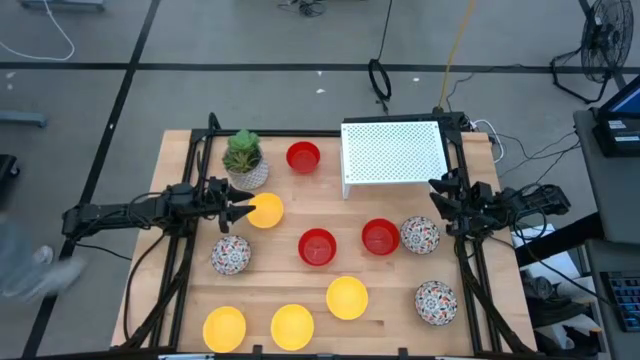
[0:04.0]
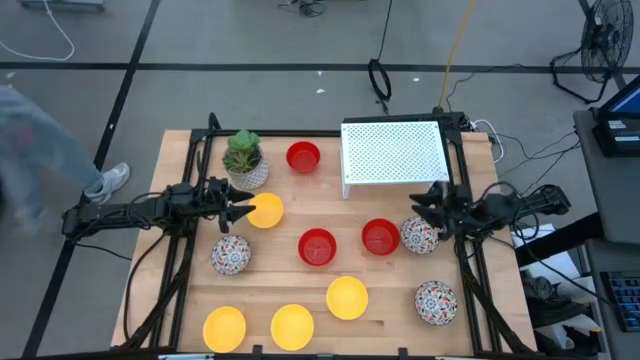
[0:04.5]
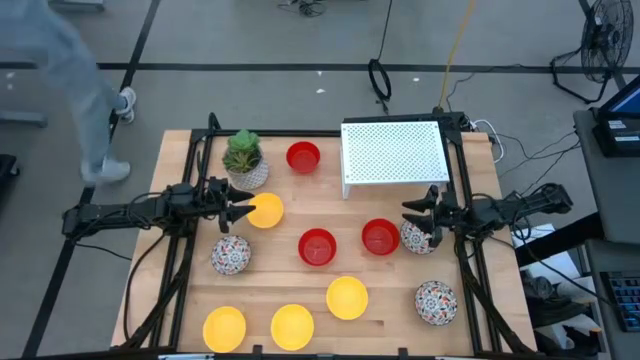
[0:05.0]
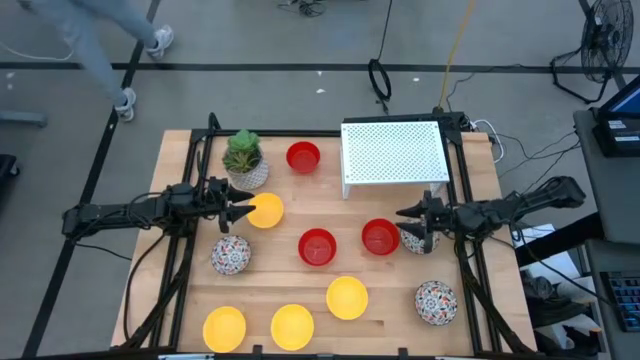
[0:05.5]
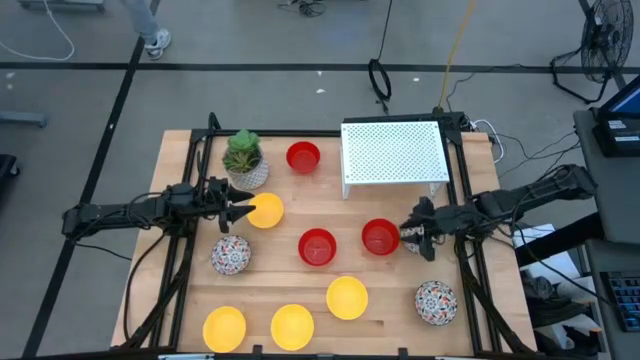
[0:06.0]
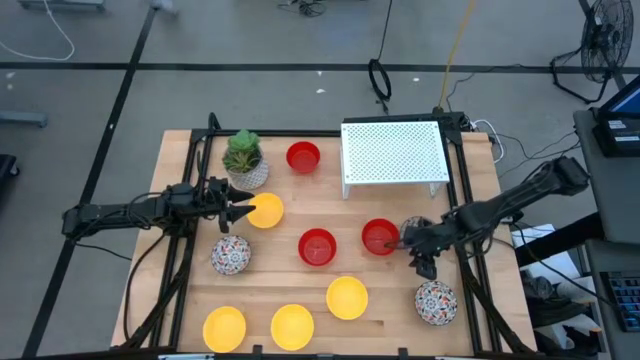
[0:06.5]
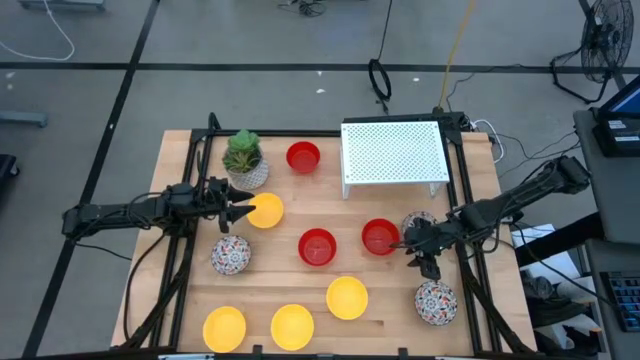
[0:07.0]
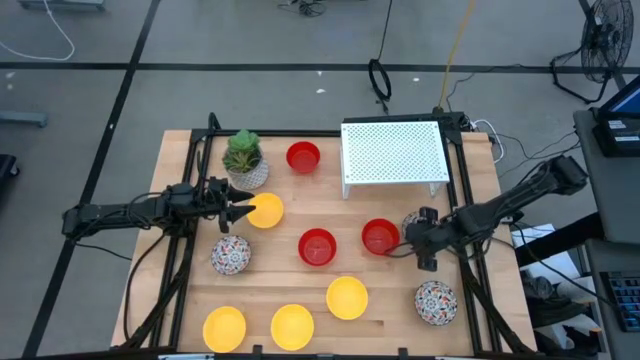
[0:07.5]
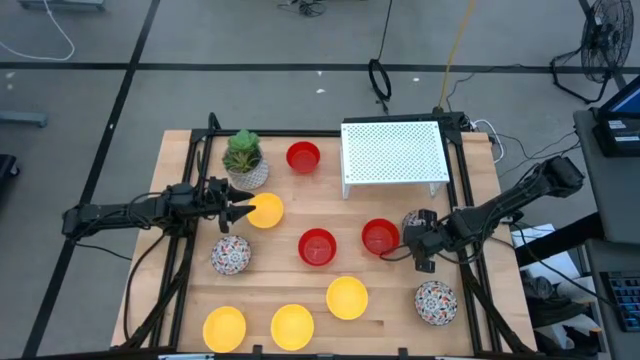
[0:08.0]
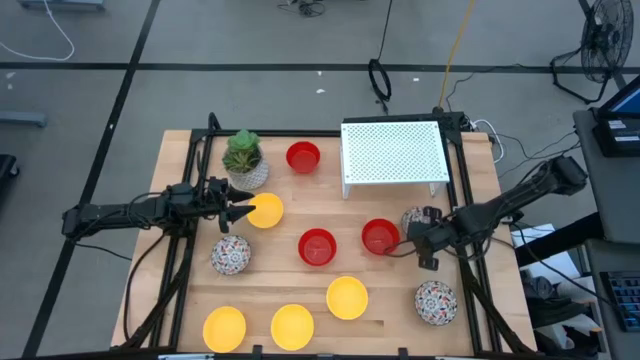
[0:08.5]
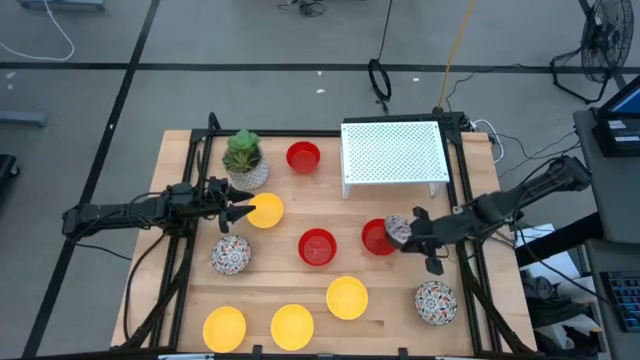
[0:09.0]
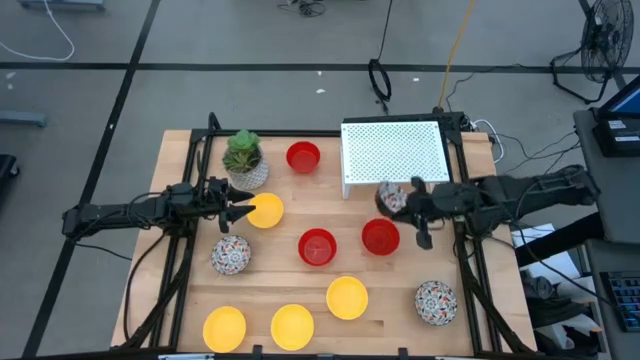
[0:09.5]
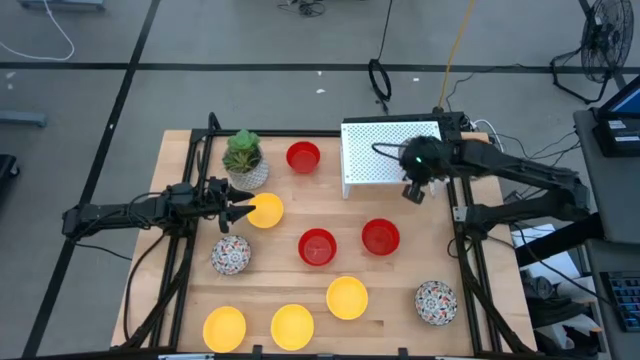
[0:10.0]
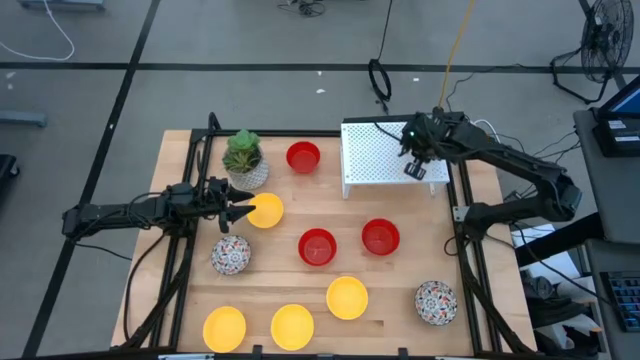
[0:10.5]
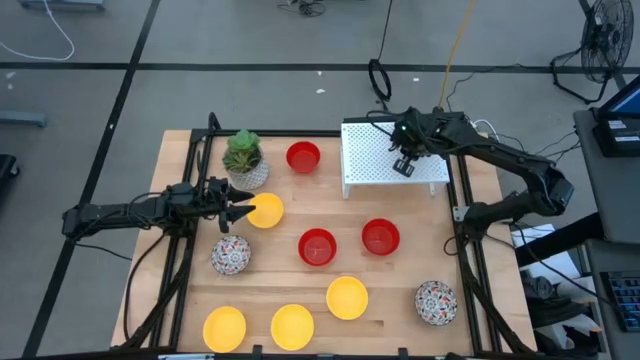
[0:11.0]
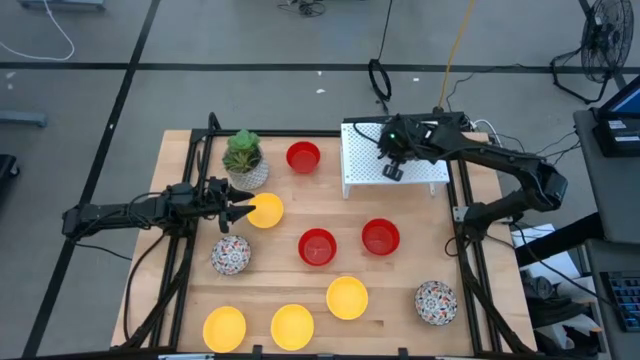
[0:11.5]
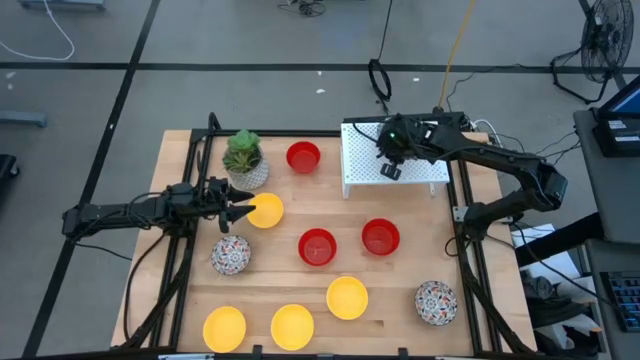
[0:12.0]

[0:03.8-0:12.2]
Task: Pick & Place Mini bowls
Put the black patterned bowl on the shelf

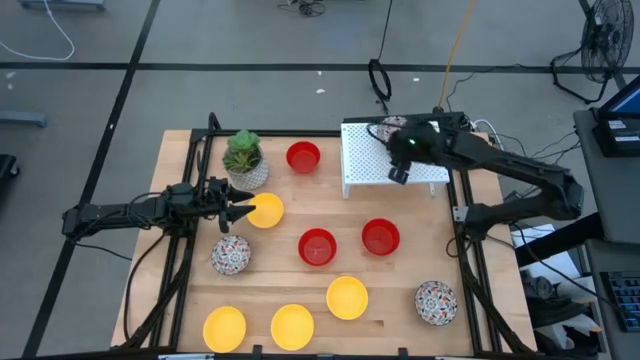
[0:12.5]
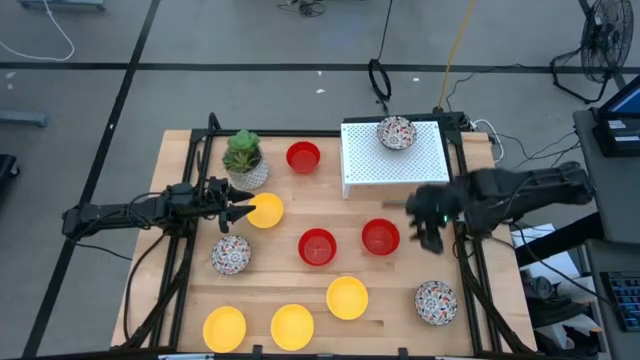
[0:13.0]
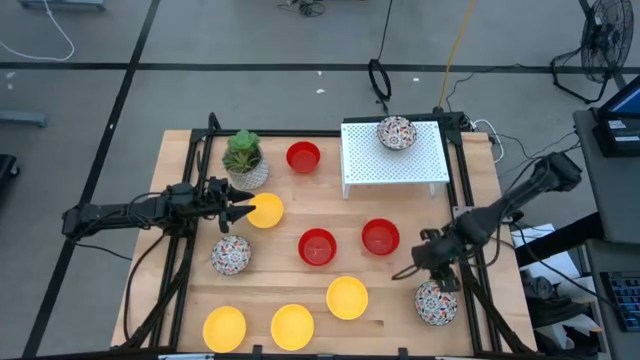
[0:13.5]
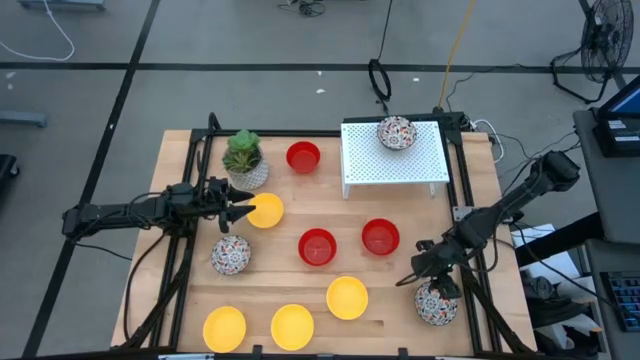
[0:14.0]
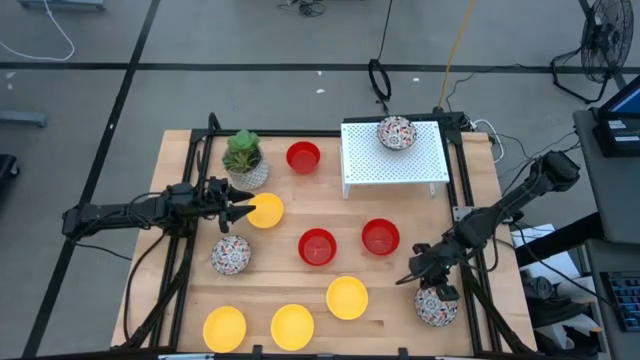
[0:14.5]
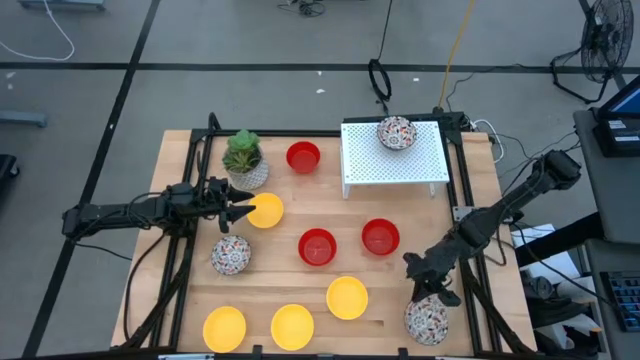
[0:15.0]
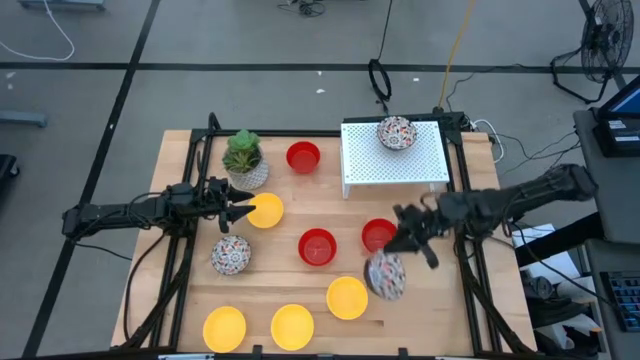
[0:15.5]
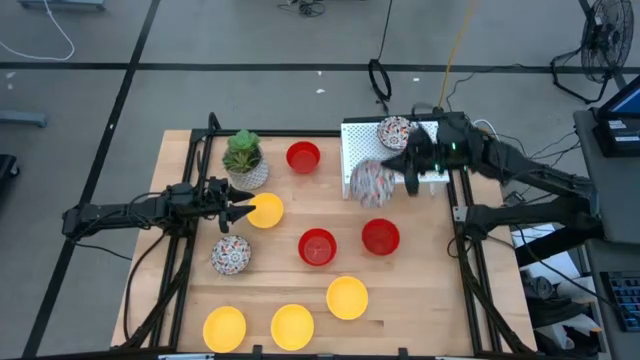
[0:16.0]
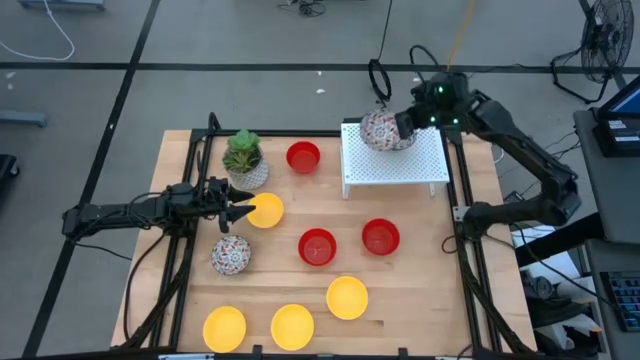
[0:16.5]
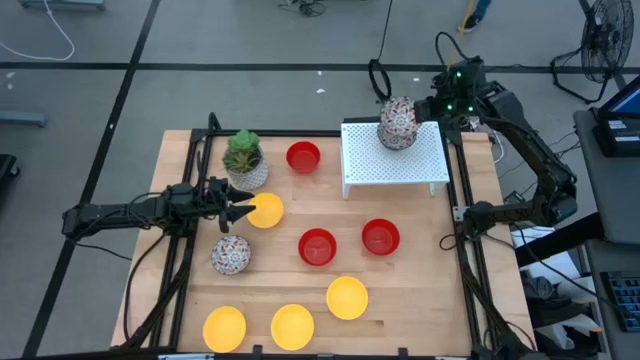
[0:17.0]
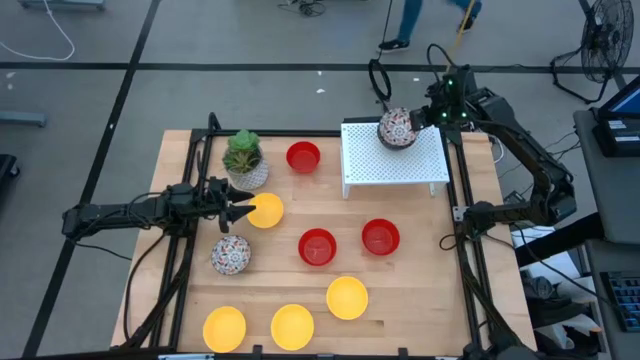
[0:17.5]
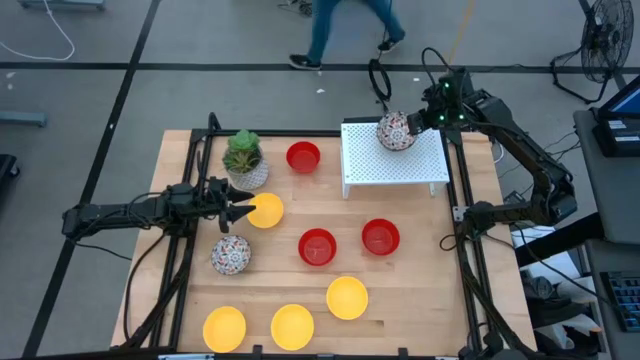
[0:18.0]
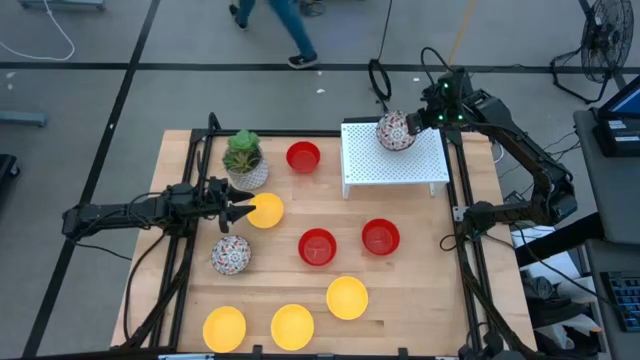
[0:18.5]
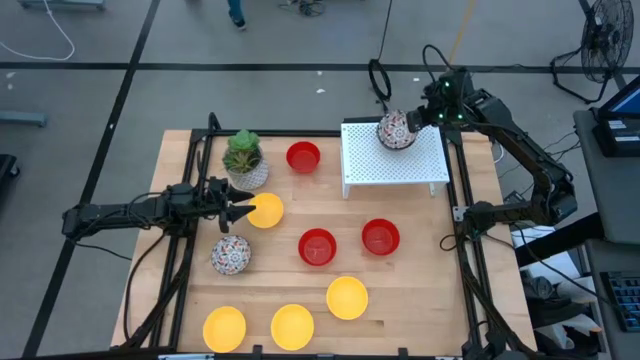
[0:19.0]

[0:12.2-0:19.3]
Stack the black patterned bowl on top of the black patterned bowl on the shelf

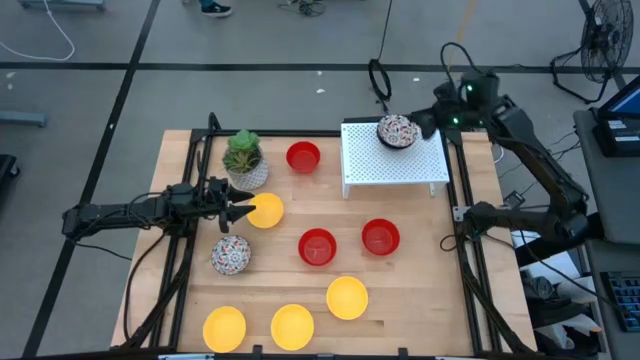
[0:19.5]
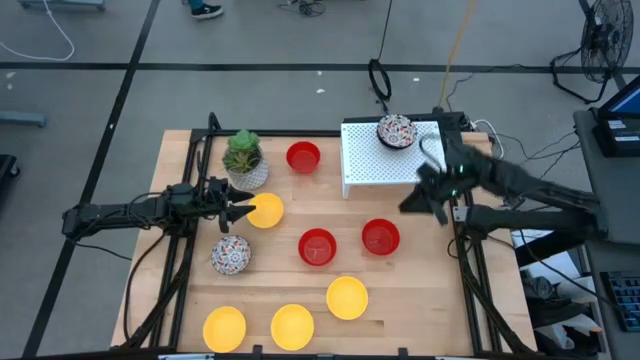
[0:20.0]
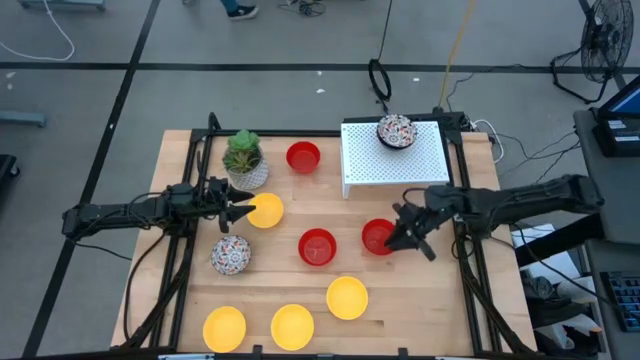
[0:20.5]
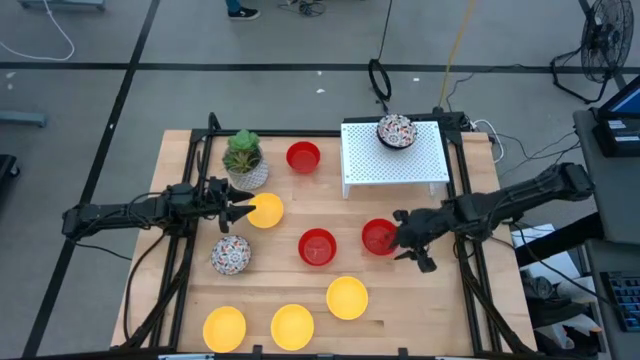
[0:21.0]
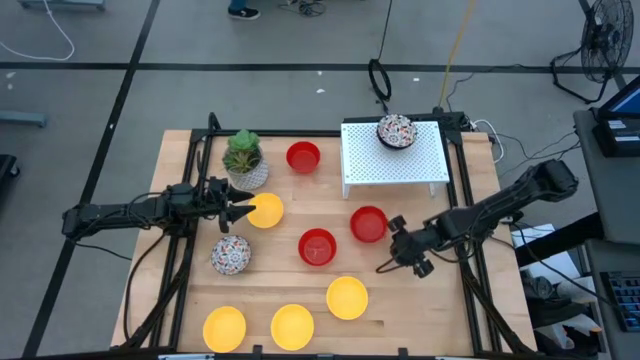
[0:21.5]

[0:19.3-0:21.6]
Put the red bowl on the shelf

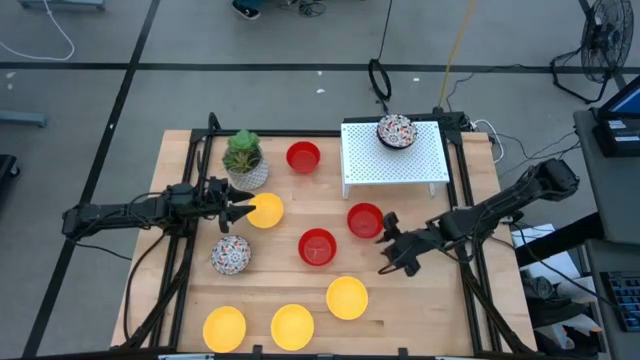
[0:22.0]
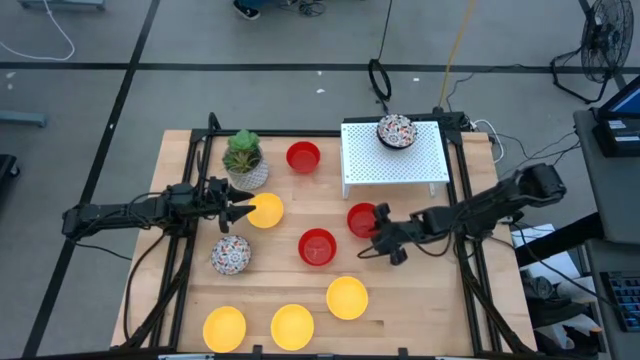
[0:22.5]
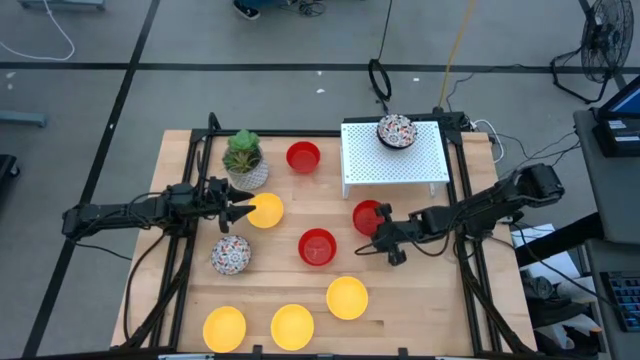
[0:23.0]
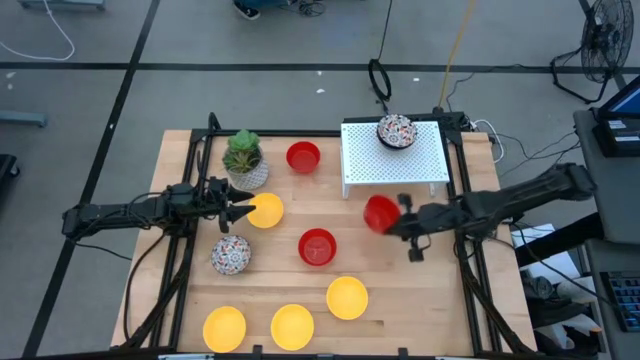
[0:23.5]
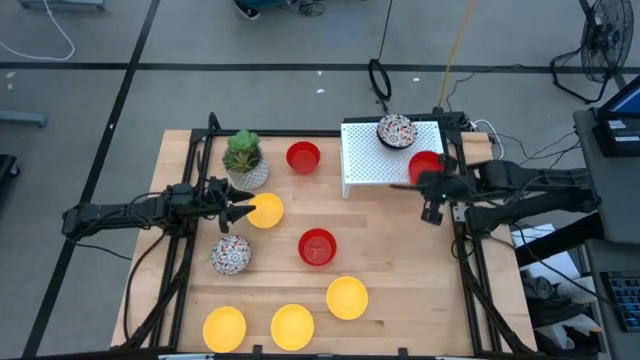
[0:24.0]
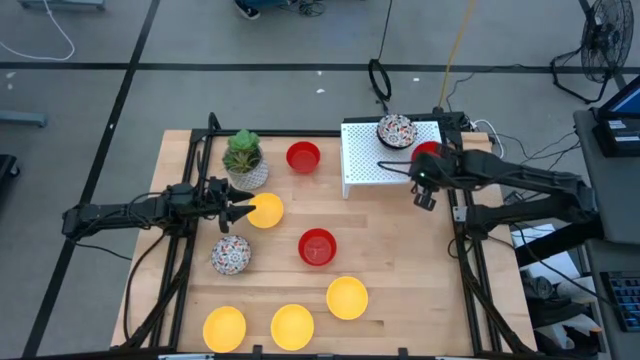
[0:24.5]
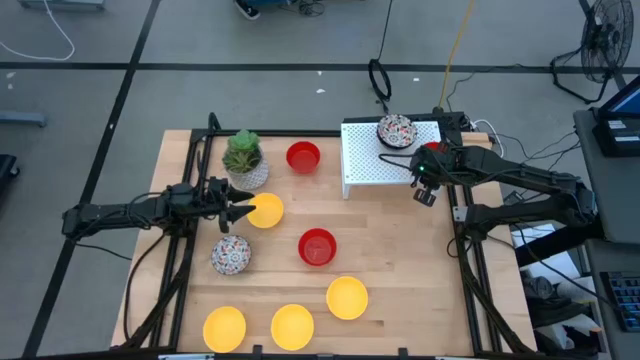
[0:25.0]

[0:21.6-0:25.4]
Put the red bowl on the shelf
